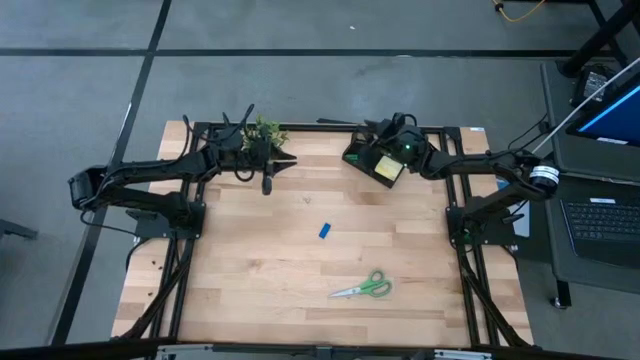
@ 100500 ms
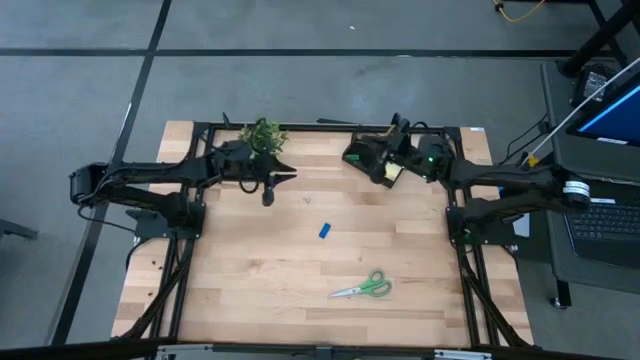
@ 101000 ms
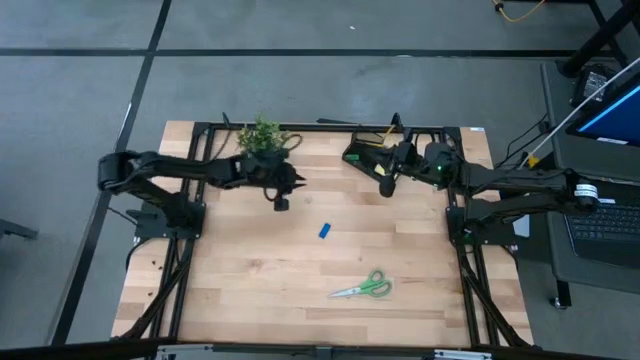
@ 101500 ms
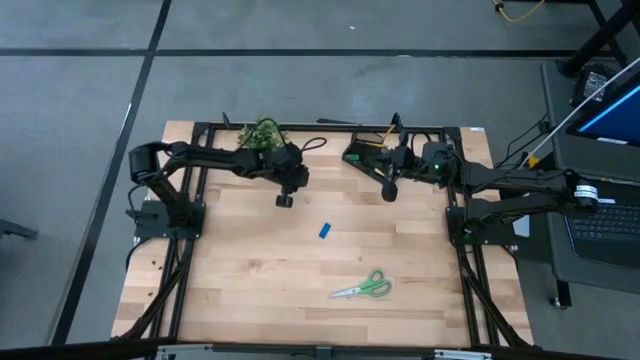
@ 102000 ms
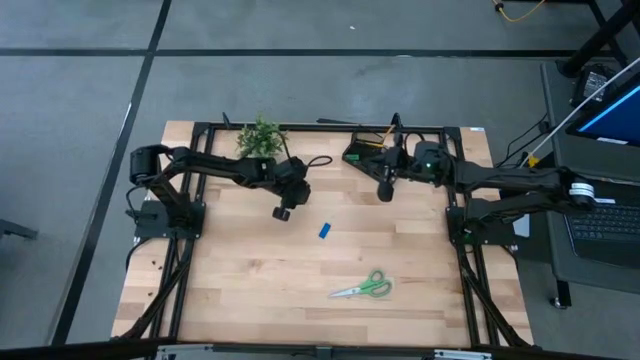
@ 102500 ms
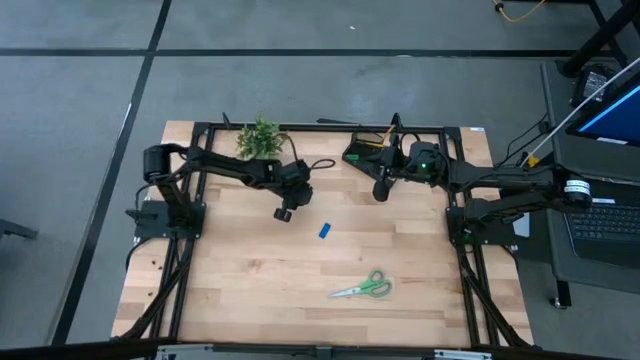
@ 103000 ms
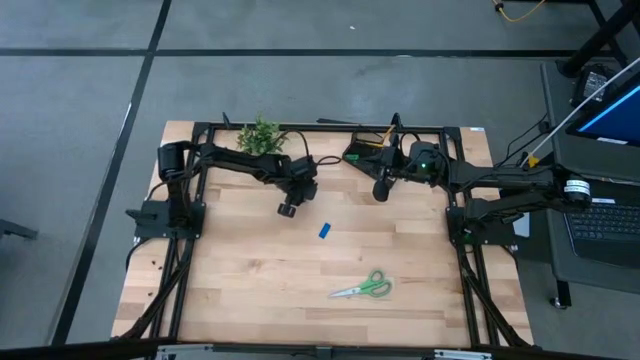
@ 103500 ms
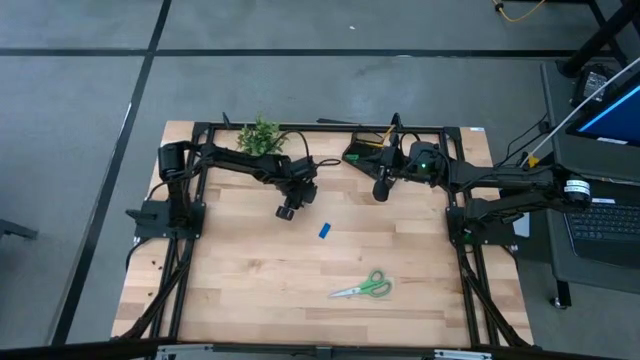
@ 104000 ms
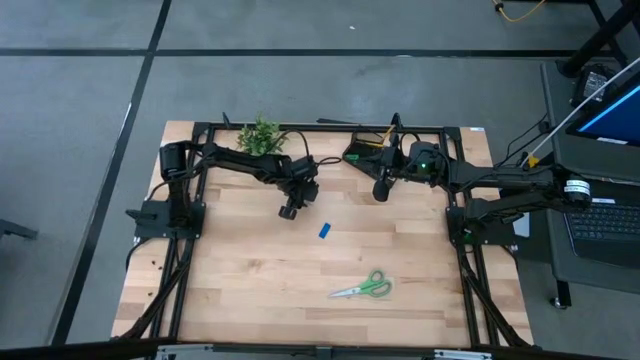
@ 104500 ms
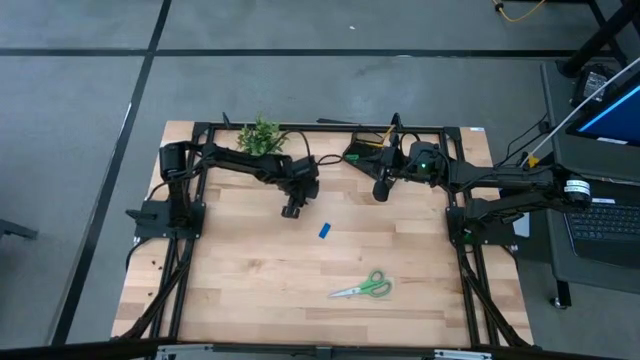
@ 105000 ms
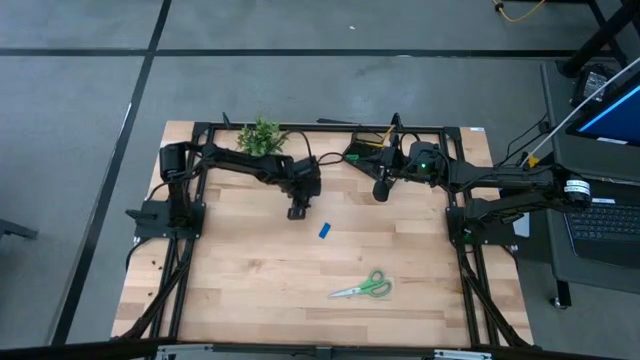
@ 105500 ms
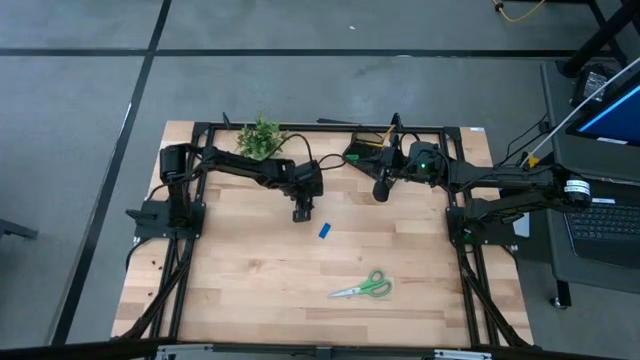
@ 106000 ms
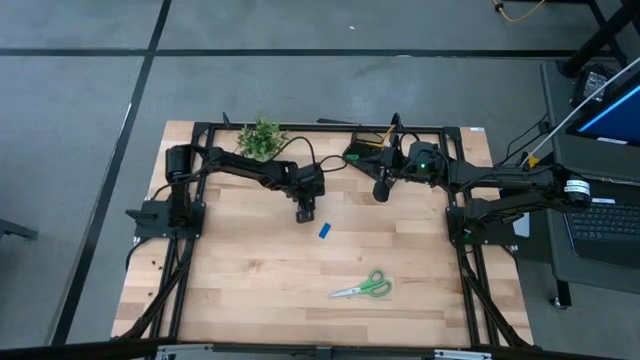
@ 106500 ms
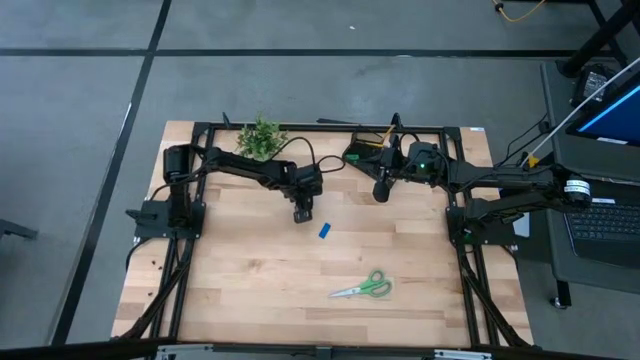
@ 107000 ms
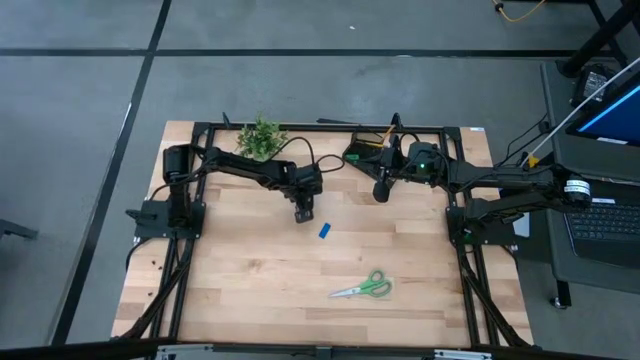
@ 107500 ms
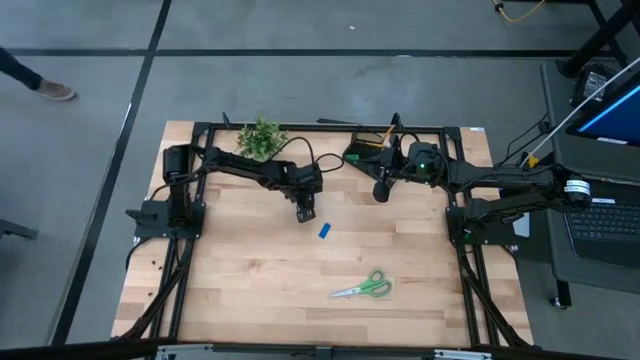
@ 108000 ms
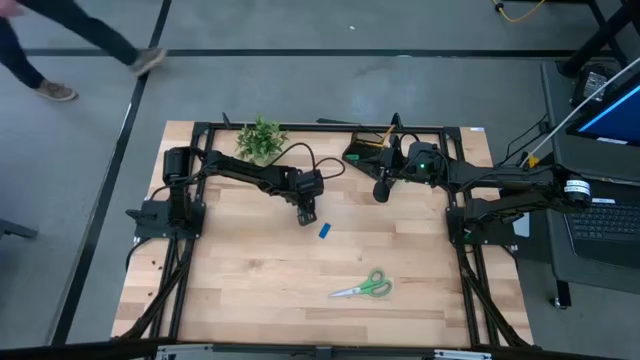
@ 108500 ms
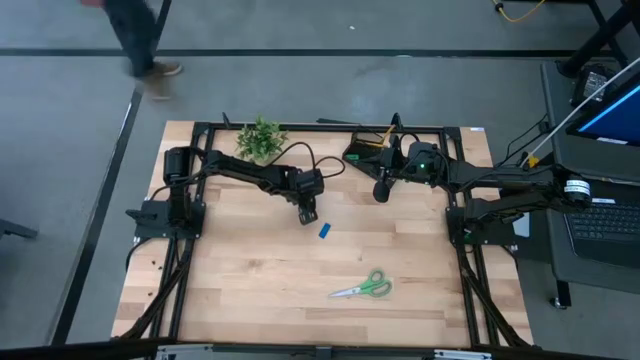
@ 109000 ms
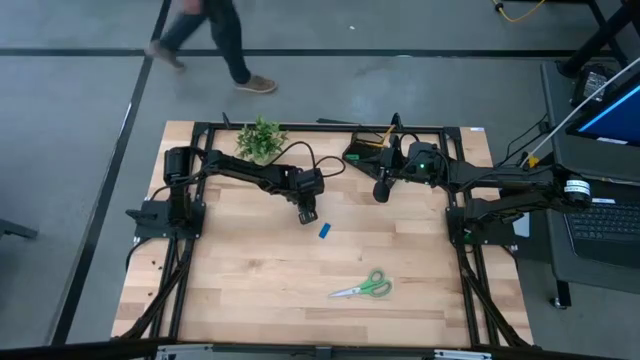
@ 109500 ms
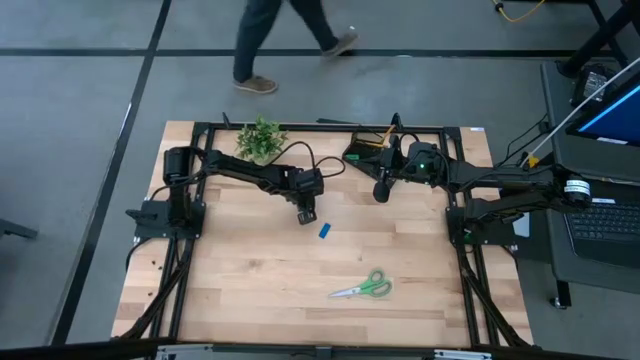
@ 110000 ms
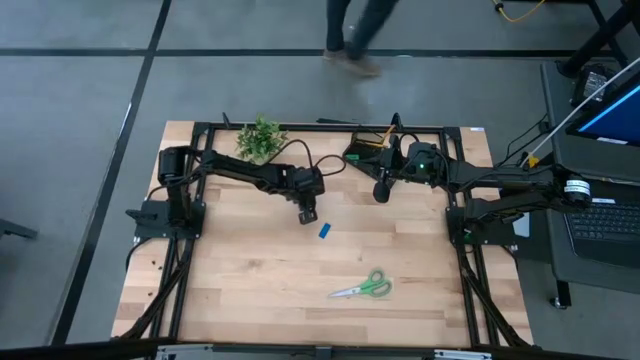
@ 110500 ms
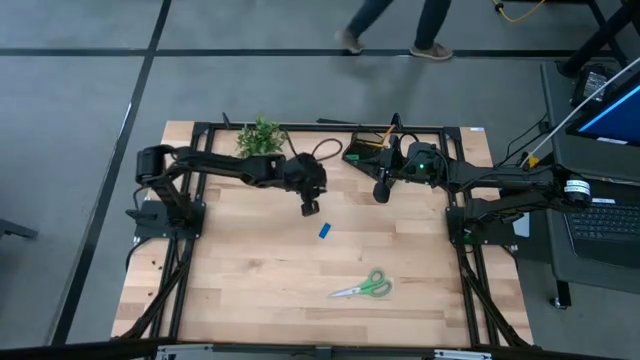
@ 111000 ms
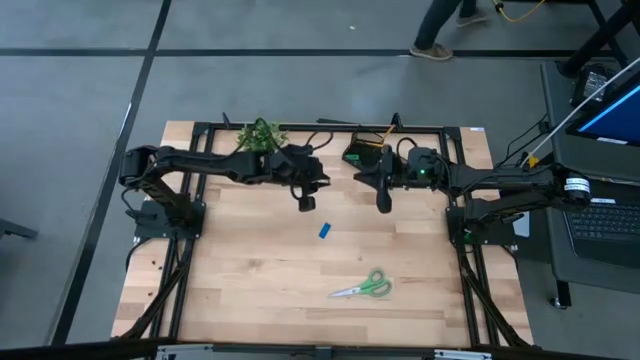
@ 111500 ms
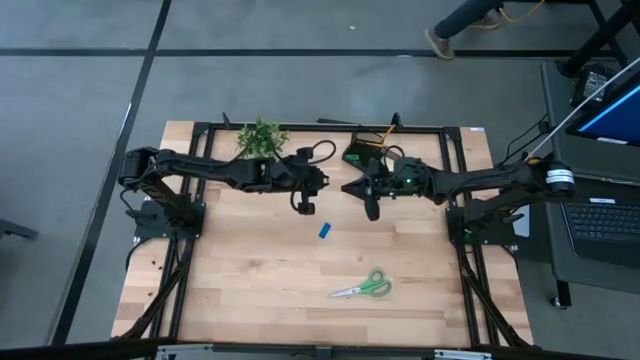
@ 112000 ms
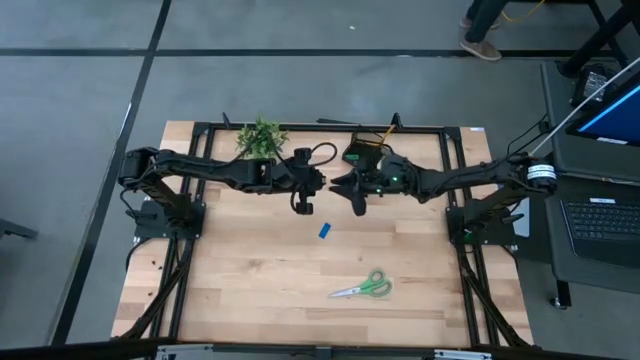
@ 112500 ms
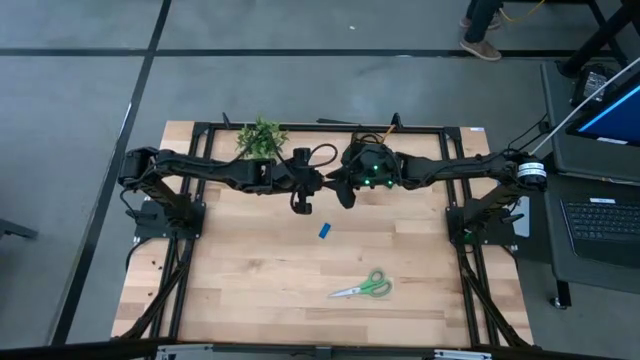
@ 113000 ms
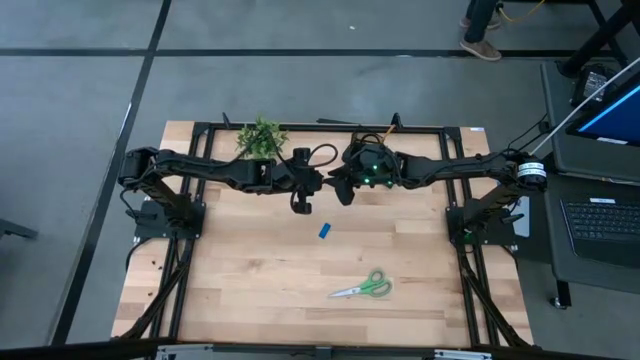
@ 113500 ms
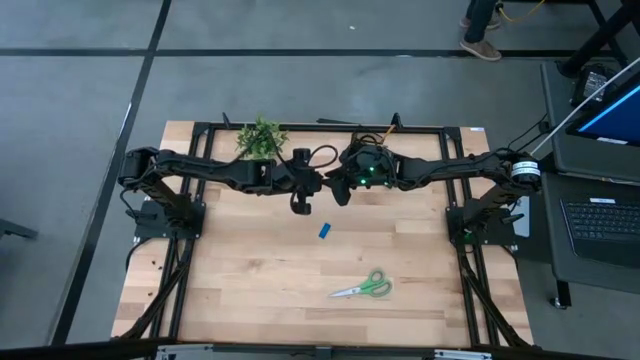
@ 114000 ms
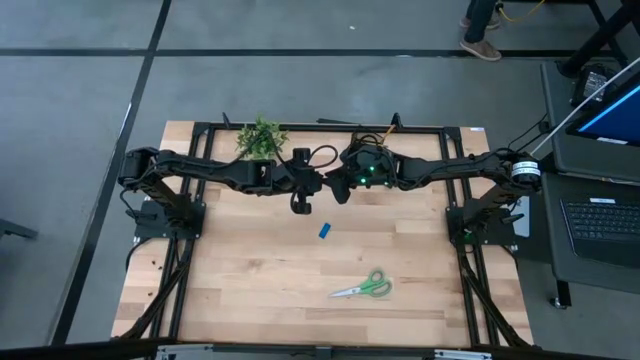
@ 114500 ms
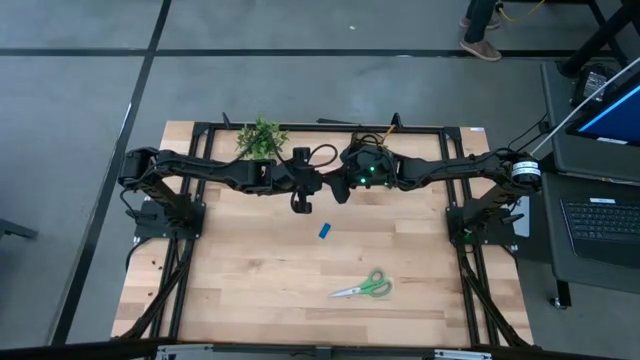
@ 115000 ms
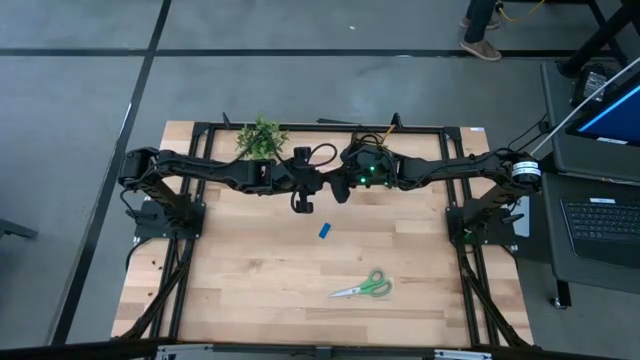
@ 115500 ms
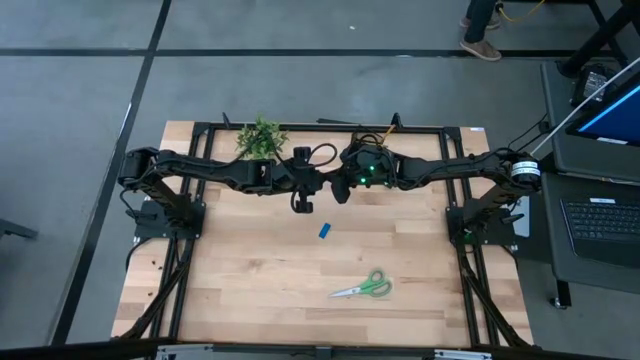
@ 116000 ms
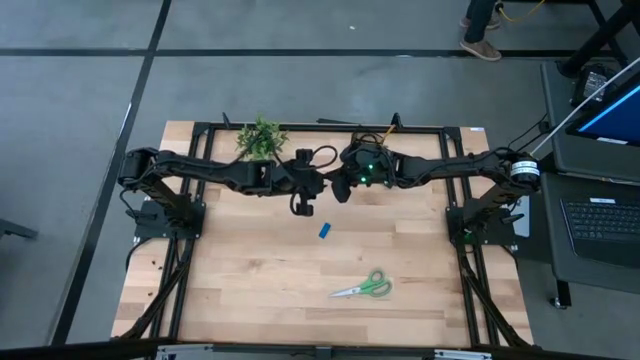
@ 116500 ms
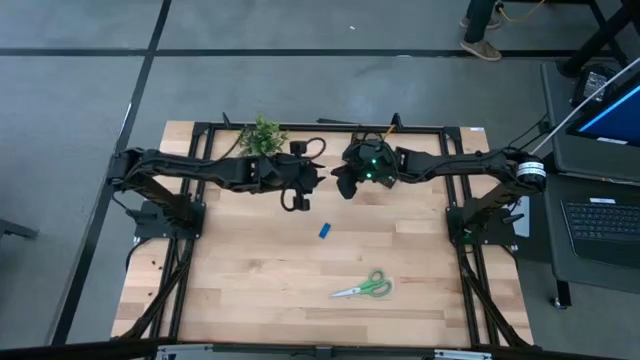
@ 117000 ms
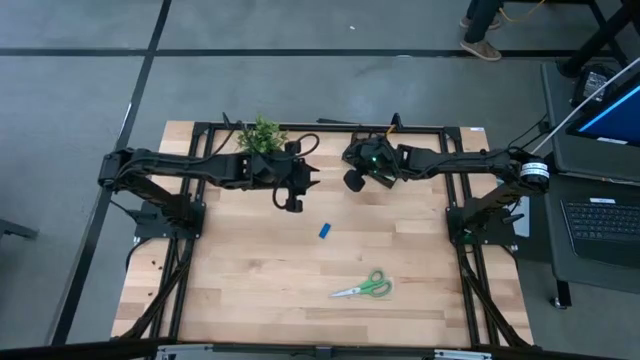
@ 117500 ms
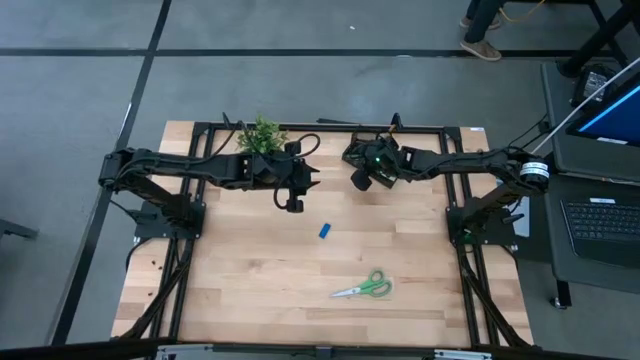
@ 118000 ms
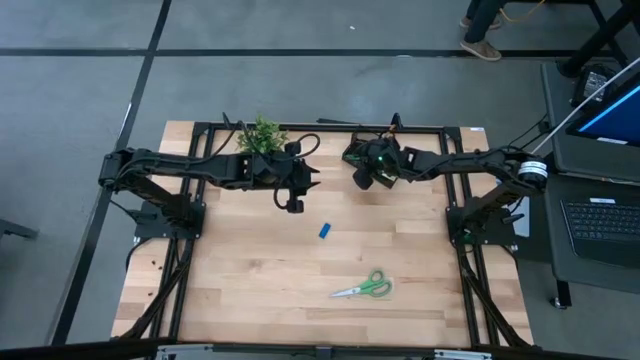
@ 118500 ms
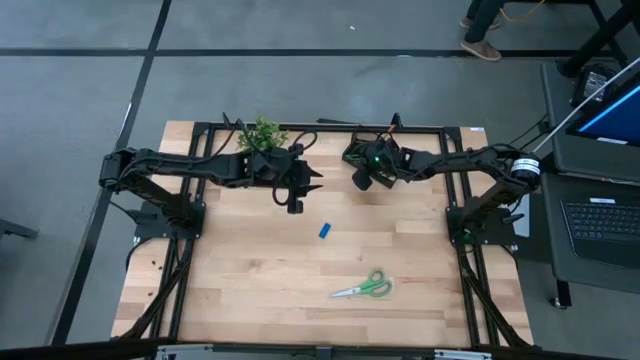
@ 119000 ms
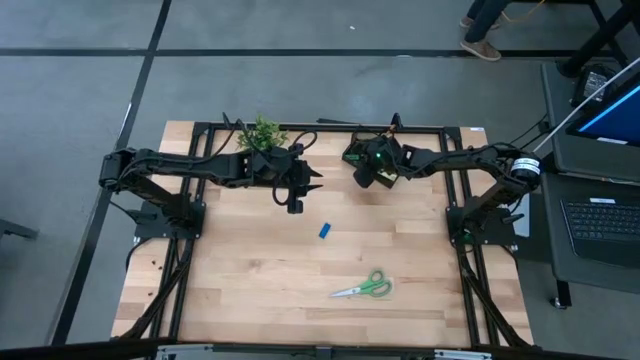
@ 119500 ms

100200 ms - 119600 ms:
Task: Pick and place office supplies into organizer
Put the brown binder clip into the black desk organizer

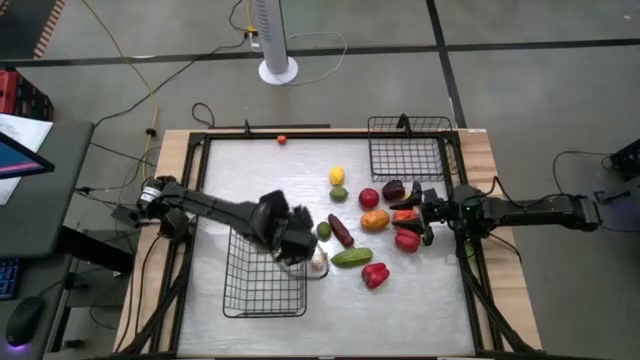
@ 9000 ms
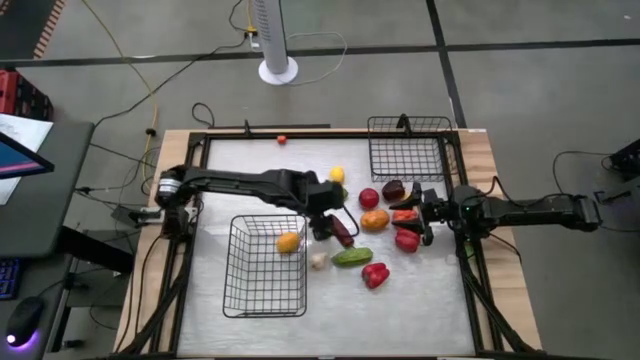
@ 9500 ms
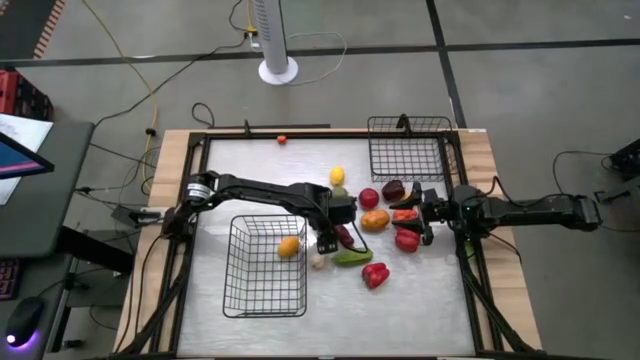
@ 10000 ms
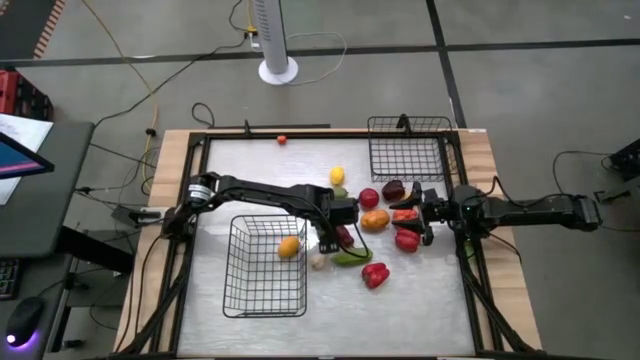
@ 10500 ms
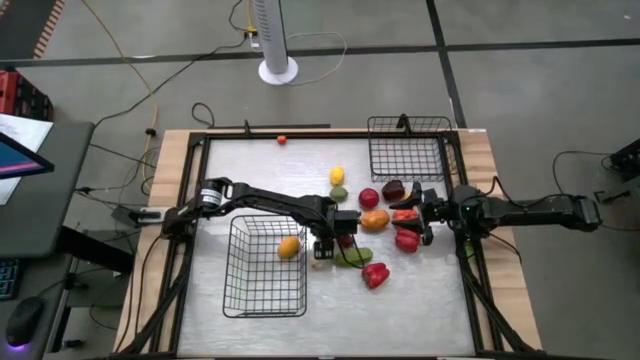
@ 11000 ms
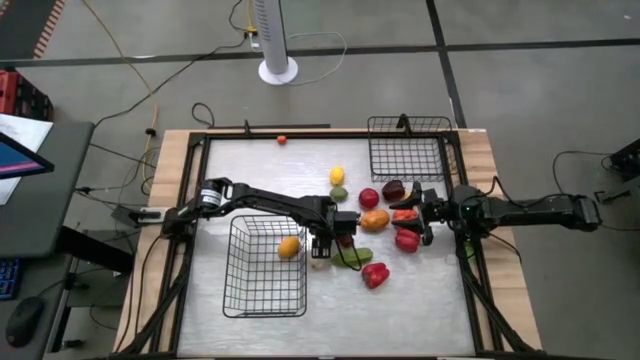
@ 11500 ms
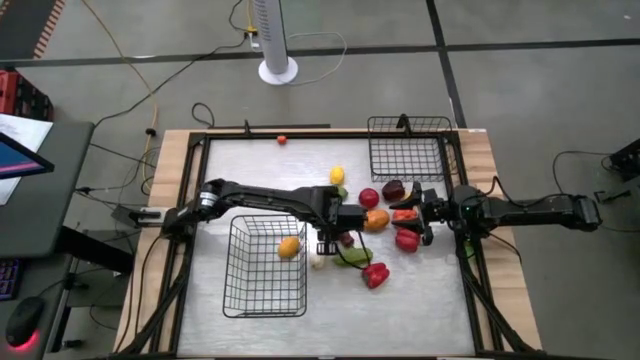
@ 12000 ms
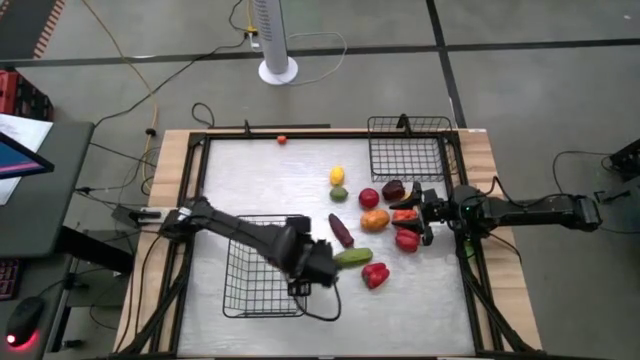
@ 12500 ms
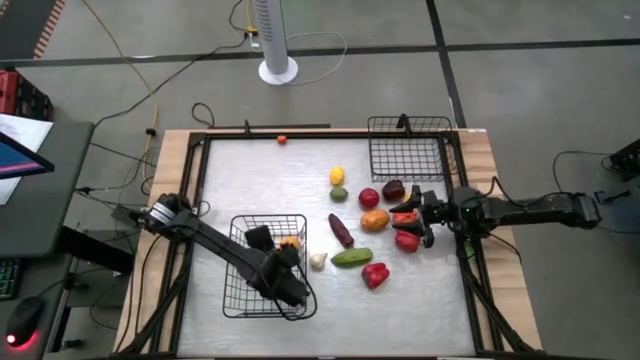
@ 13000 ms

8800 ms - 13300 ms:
Task: Sort produce into baskets
Put the lime into the bottom wire basket
